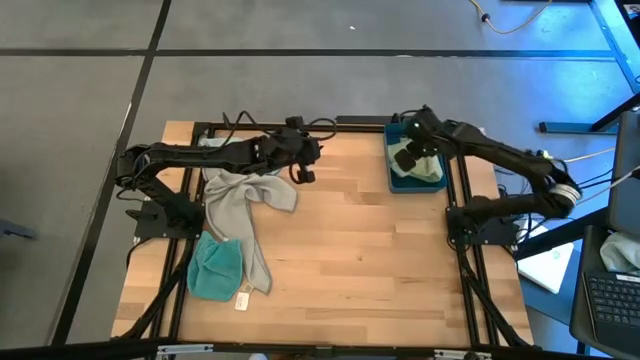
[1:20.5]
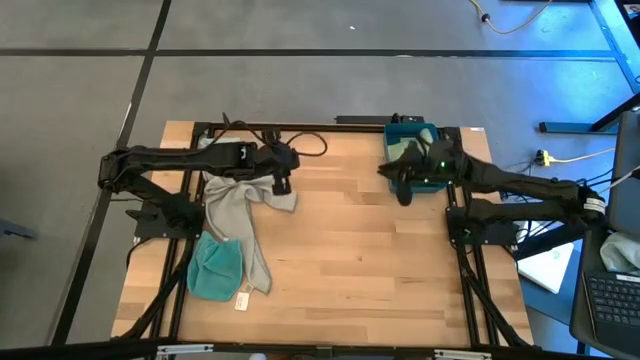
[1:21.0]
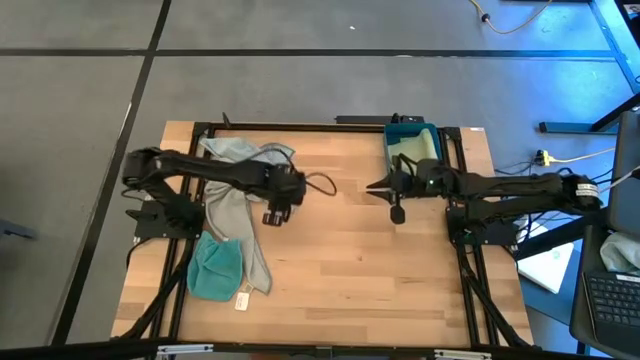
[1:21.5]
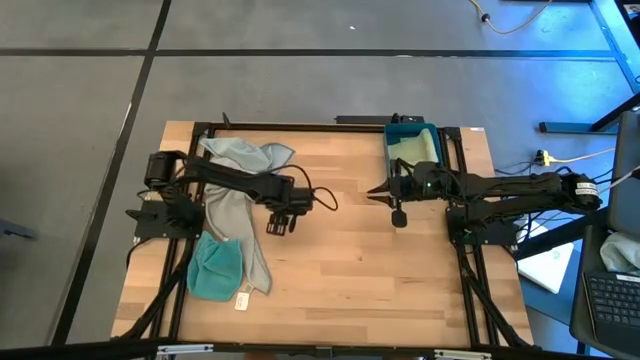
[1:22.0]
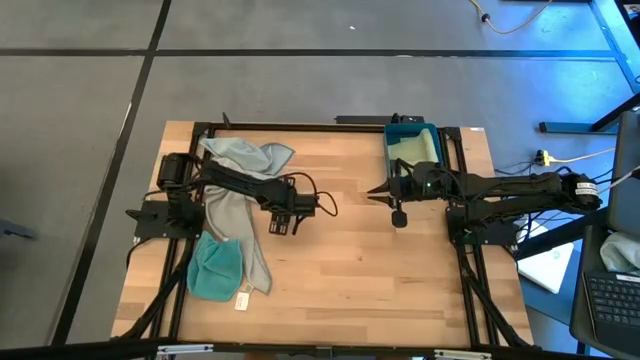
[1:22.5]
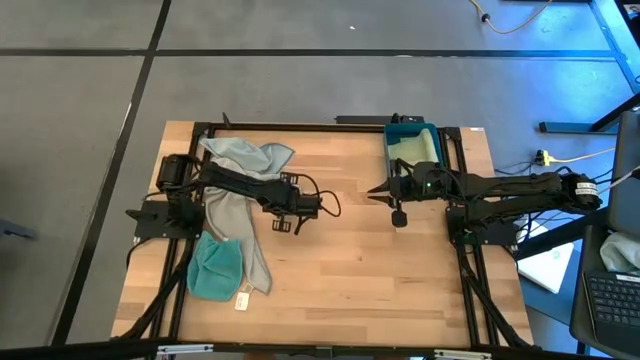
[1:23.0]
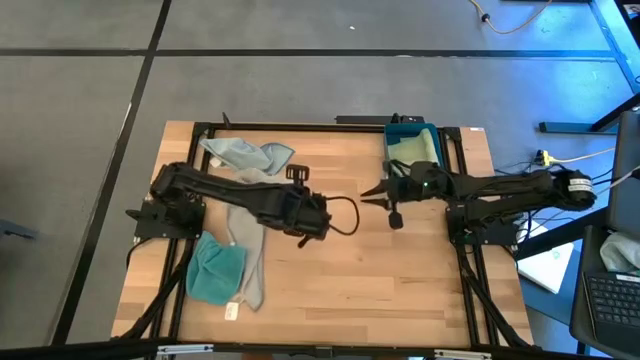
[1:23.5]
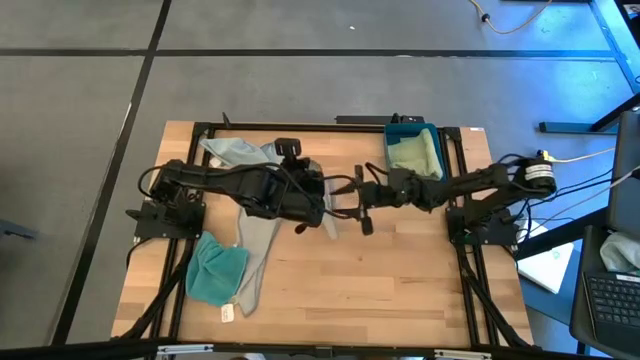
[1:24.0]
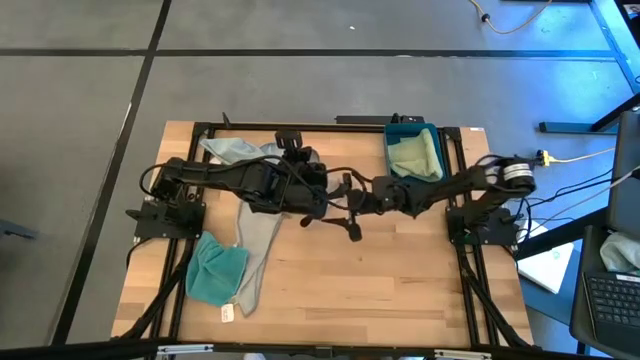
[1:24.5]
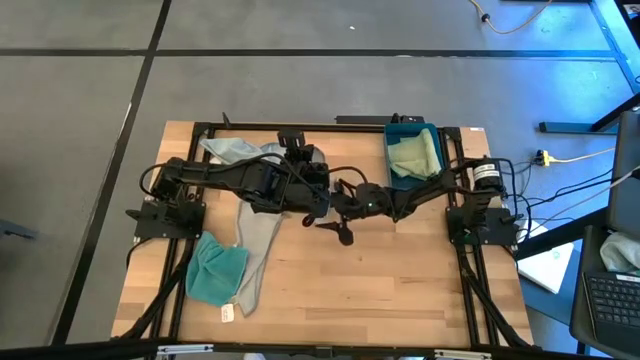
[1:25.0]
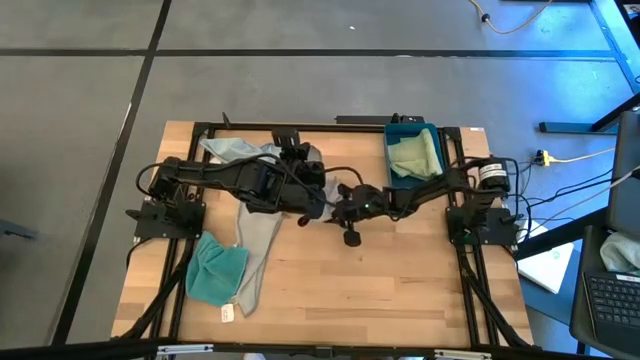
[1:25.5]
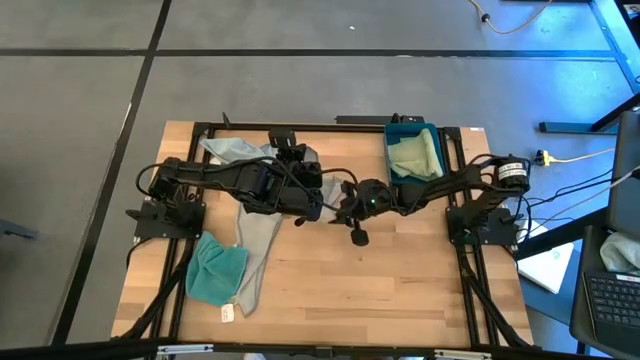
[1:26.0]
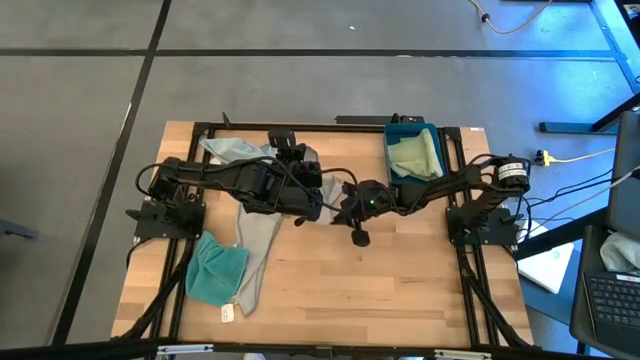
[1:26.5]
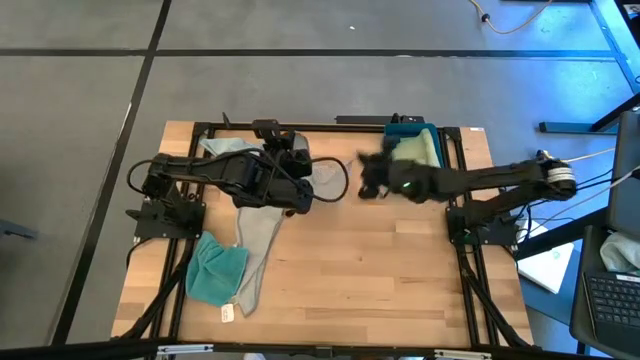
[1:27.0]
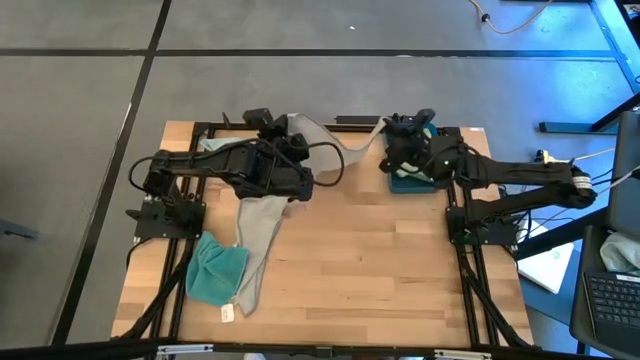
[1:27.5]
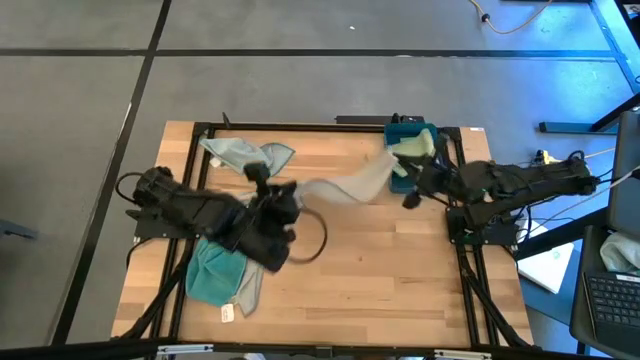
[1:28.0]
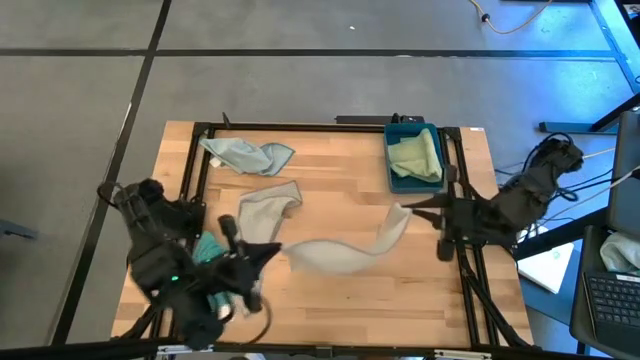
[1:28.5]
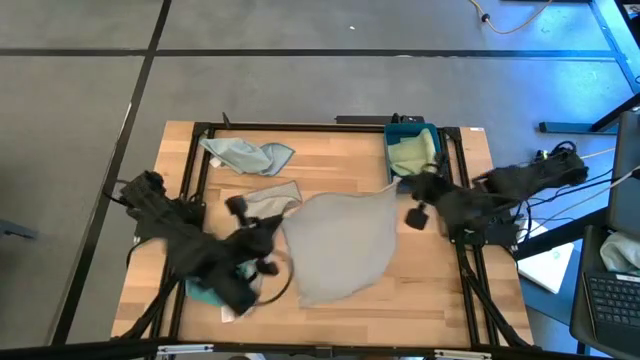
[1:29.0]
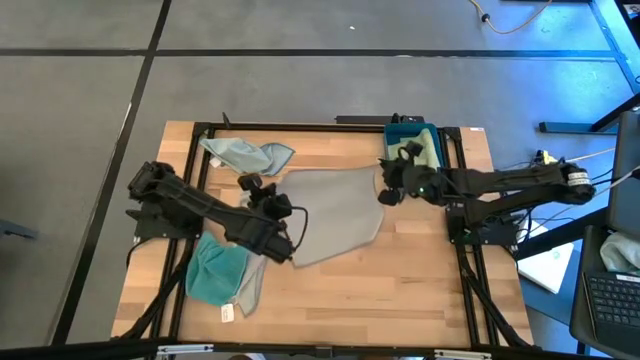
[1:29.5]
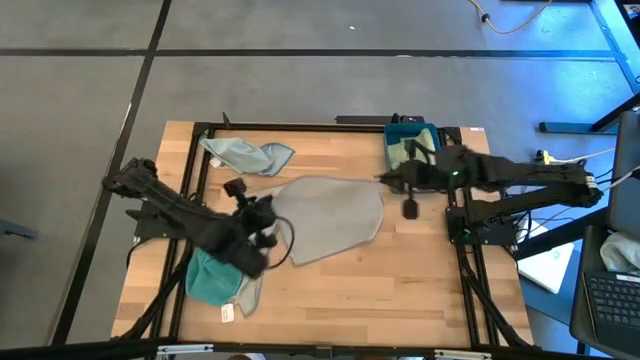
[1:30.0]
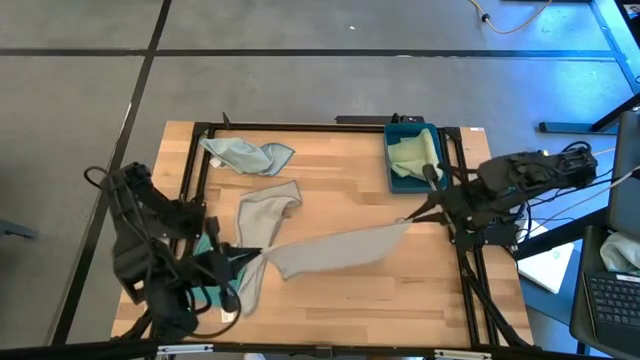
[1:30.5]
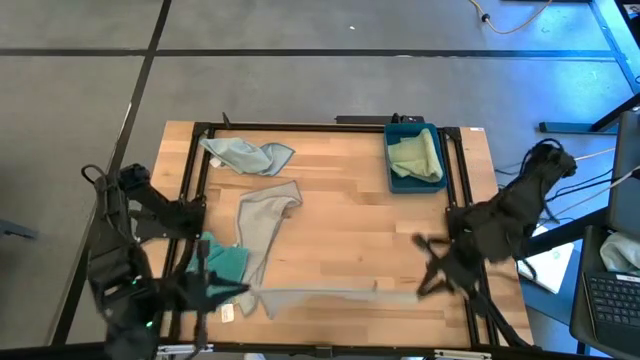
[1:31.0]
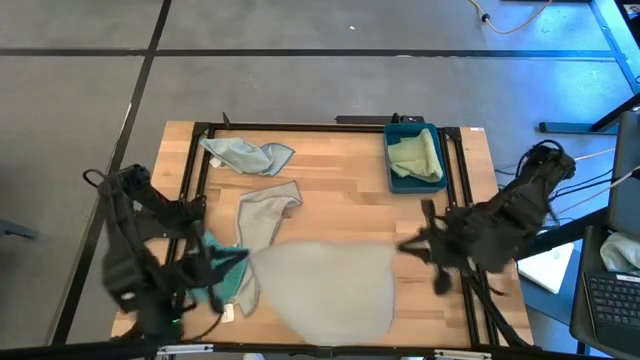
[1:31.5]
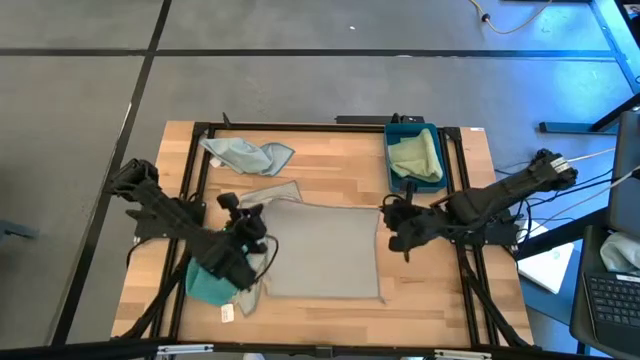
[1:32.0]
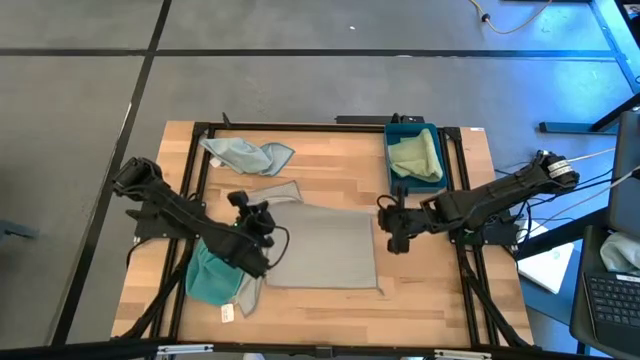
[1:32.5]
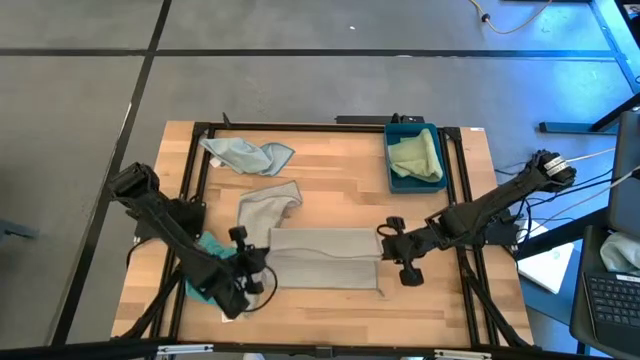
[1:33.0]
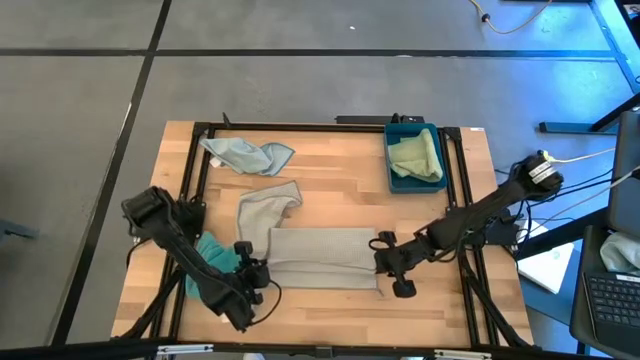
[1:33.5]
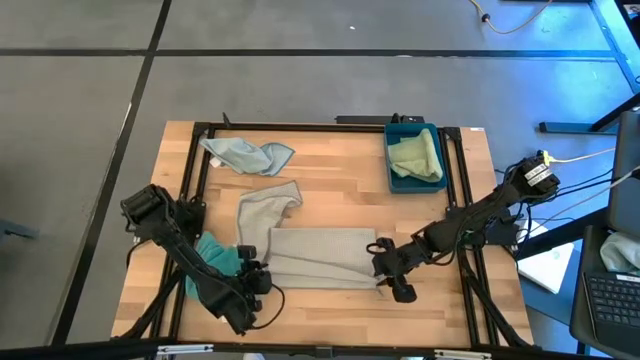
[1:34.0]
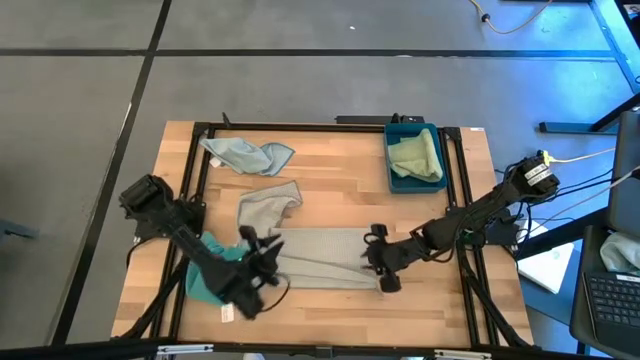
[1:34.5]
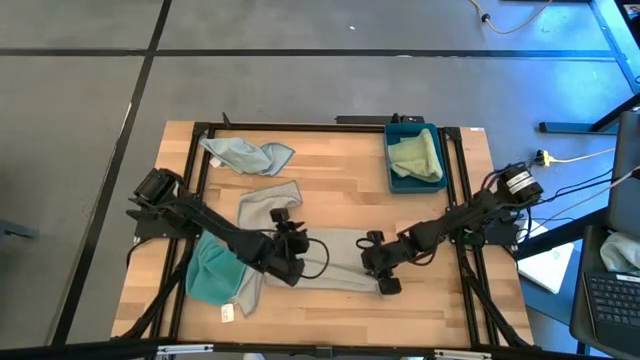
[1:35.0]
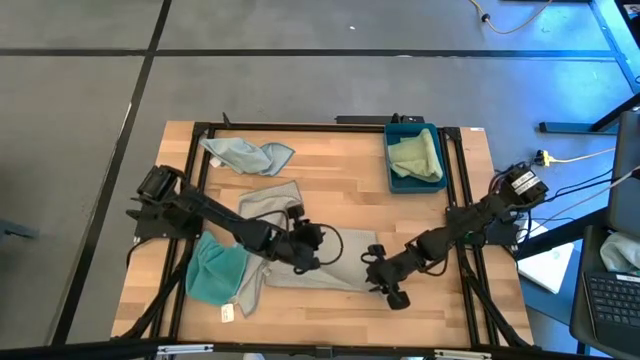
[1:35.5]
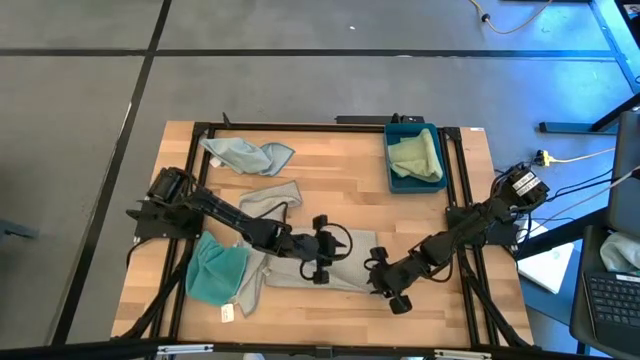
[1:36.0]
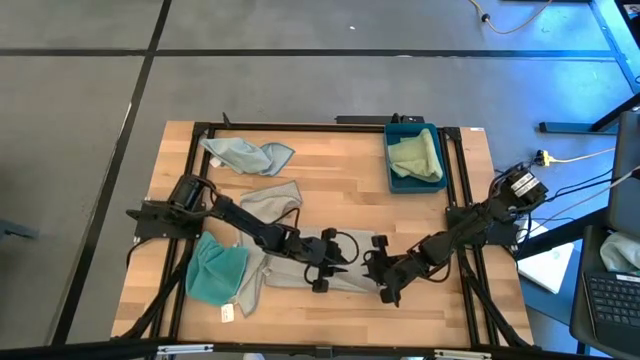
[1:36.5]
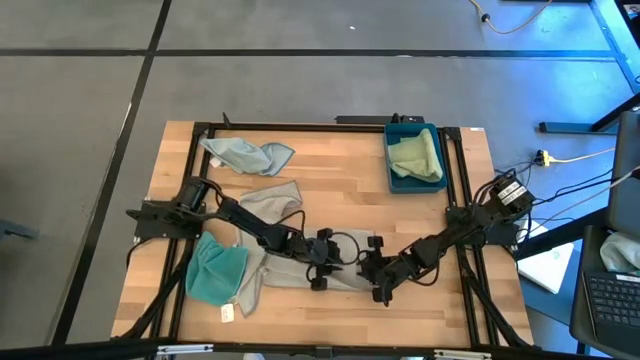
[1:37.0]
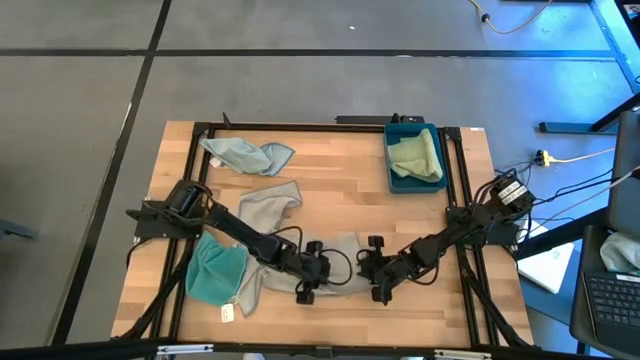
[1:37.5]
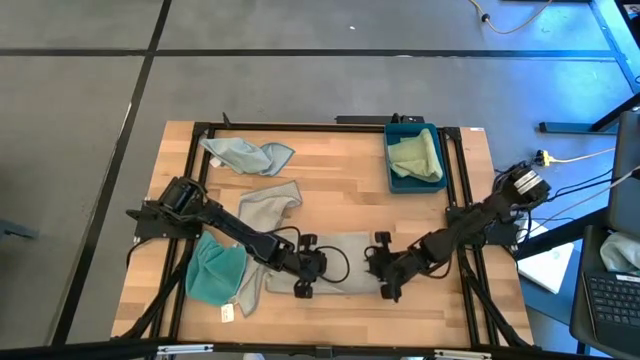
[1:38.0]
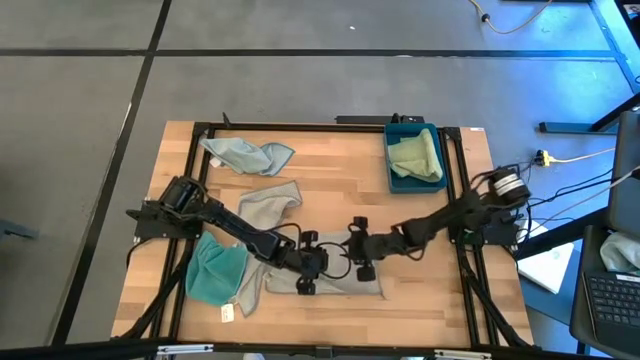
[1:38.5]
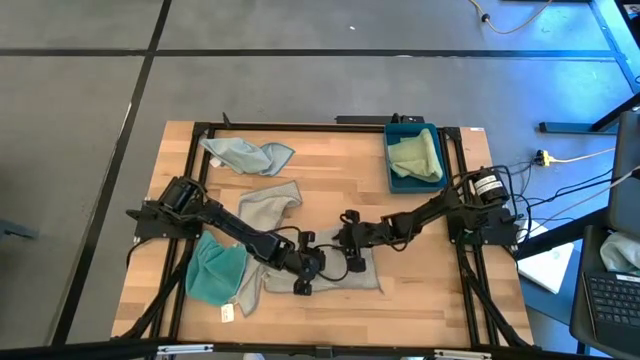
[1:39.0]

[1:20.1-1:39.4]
Task: Fold microfiber towels
Fold the top grey microfiber cloth
